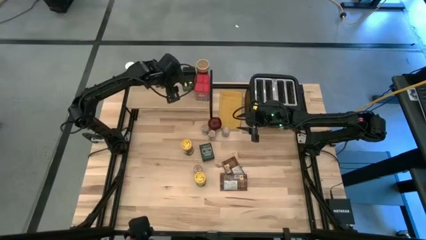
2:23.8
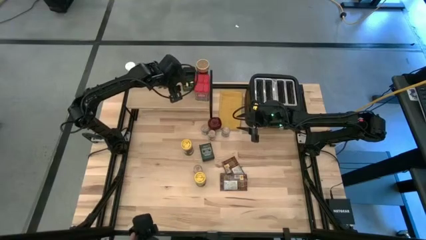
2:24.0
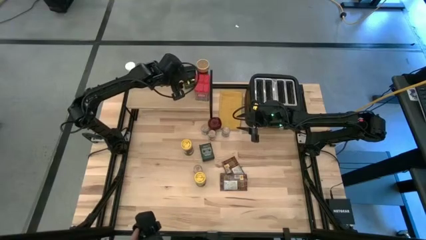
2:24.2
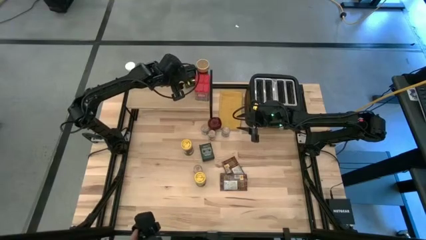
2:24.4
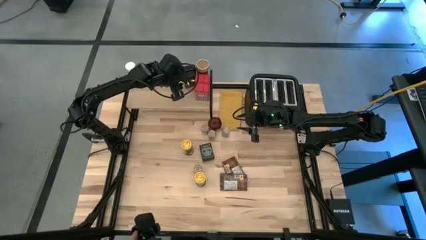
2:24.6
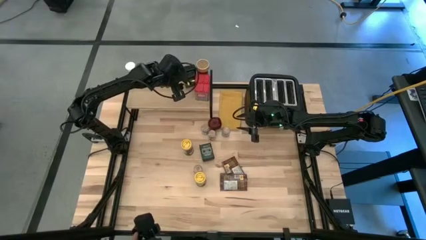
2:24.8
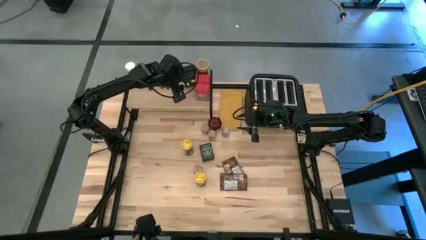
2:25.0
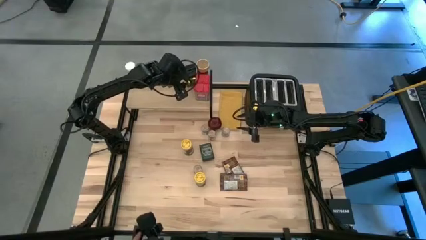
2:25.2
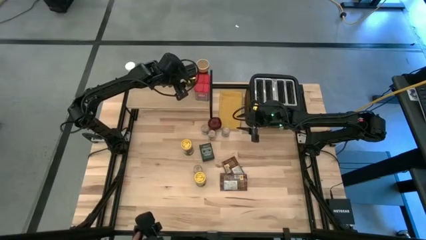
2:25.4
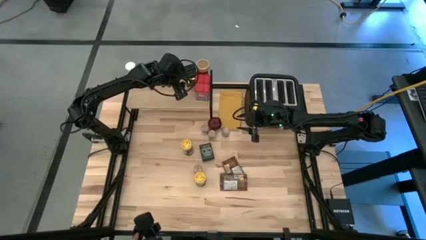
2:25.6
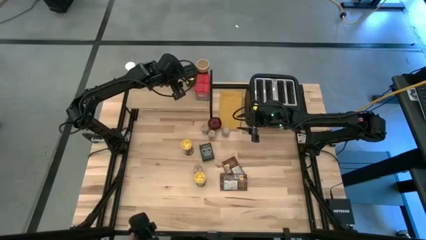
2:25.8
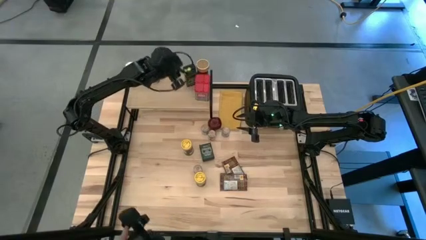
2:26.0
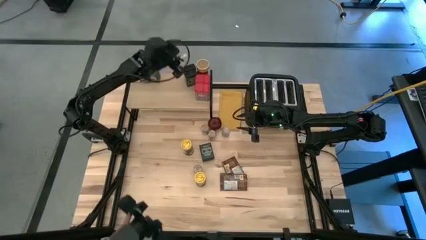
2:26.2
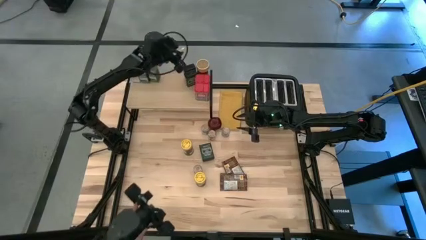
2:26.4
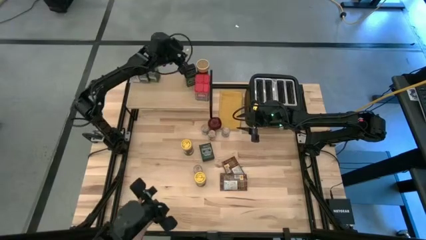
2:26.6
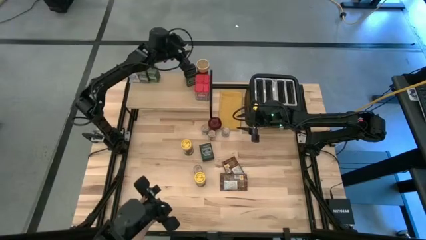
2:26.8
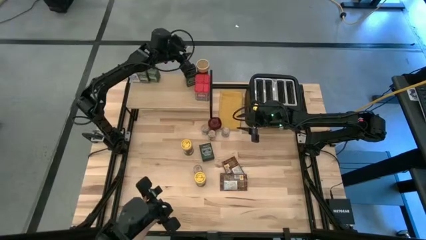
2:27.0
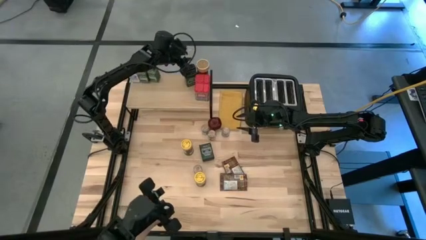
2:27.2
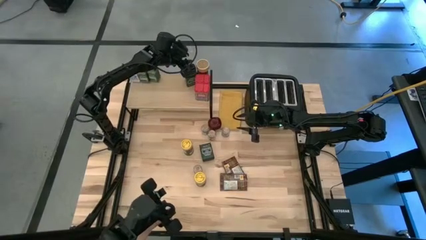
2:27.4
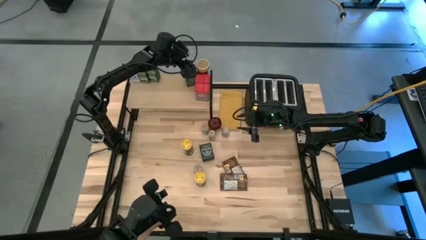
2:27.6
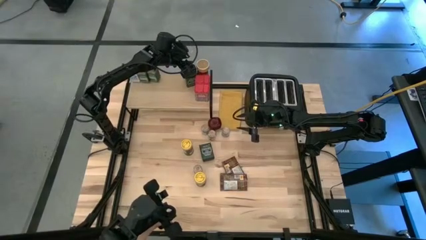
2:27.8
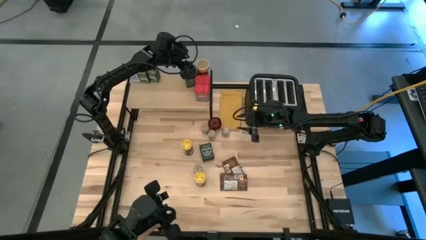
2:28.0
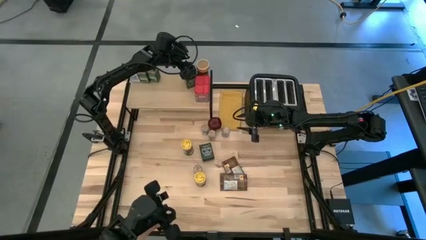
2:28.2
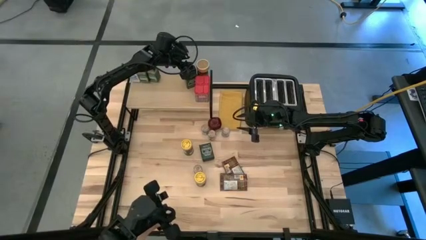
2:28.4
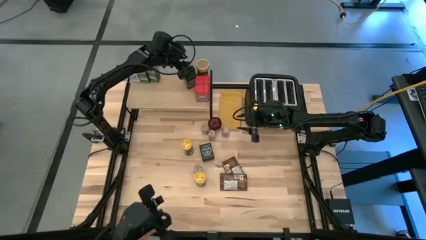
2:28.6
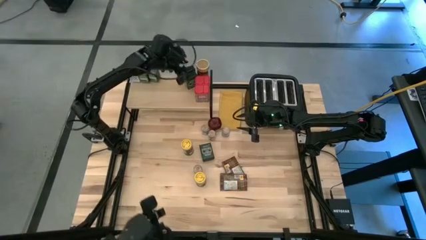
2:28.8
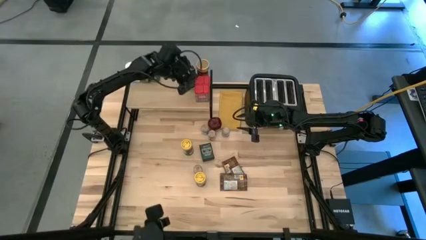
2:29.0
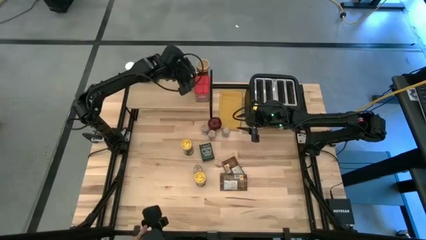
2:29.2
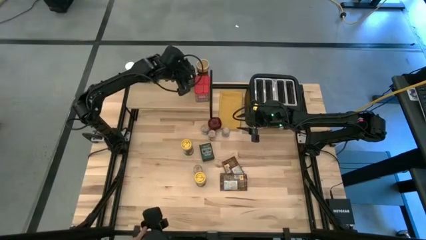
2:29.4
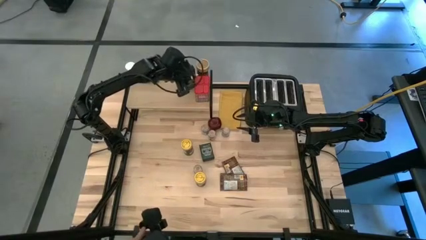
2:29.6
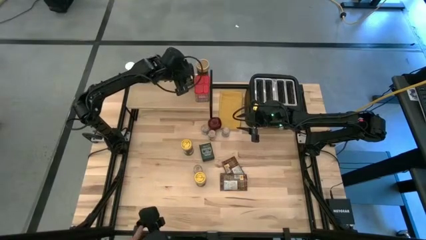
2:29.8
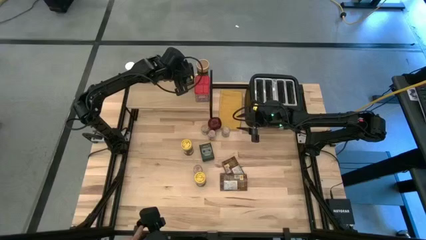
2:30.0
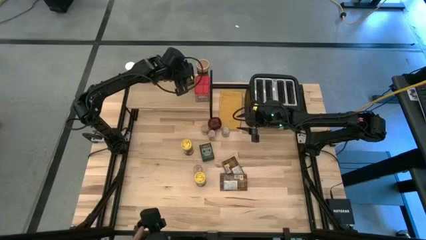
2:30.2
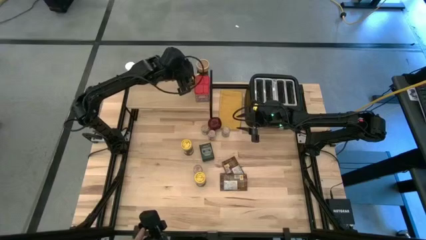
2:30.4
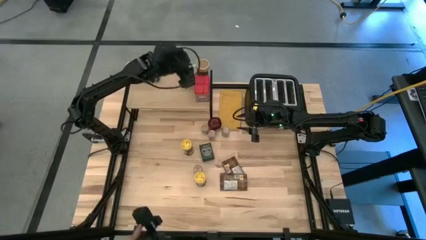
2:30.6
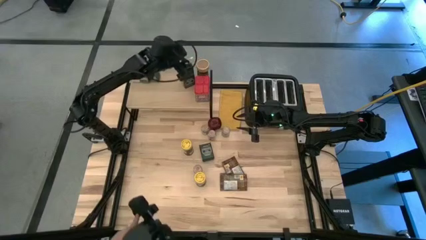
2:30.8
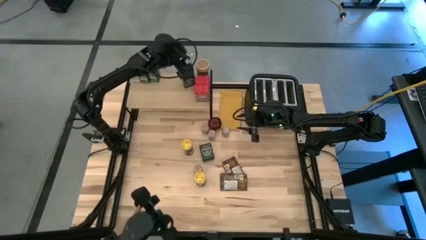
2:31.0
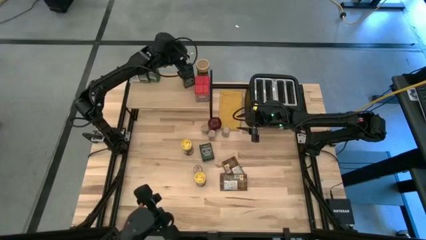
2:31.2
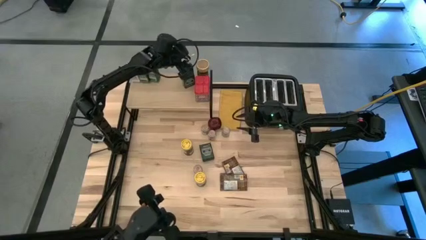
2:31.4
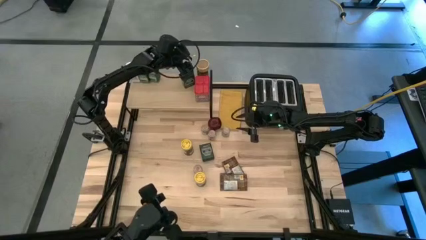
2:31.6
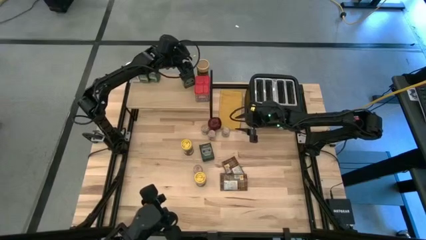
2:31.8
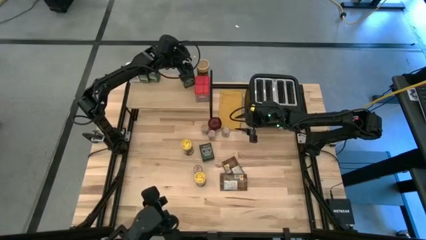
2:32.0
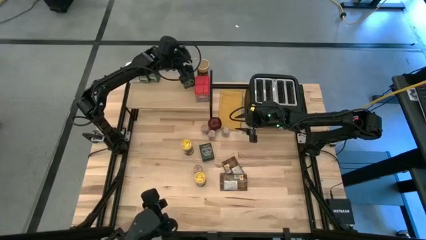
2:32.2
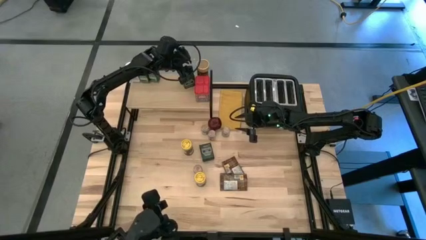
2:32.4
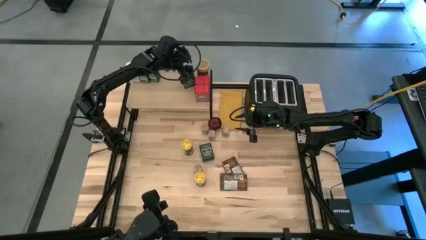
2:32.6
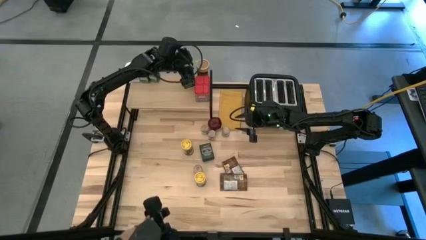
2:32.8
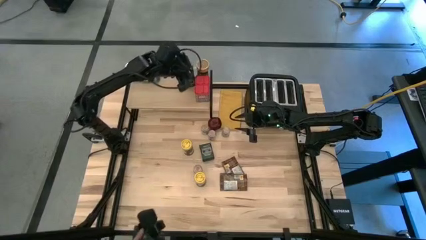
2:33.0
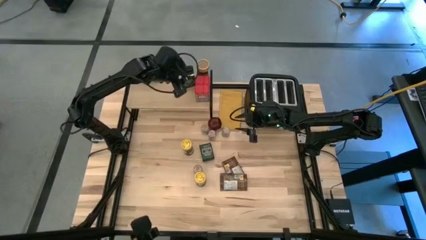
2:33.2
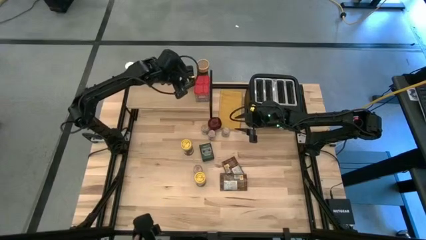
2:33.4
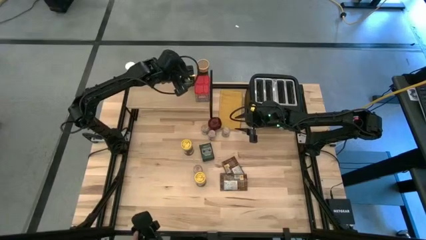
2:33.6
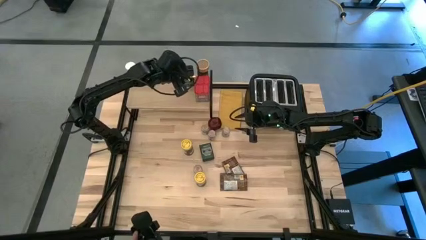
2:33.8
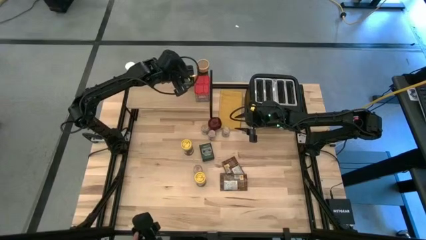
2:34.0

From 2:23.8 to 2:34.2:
Task: Shelf spices
Put the bottom black seasoning can aligned with the other black seasoning can on the shelf

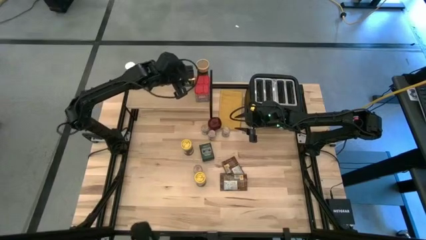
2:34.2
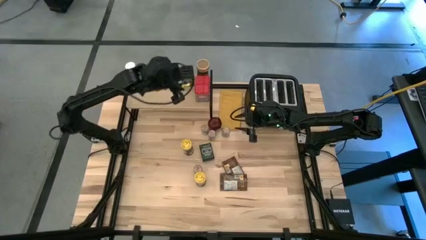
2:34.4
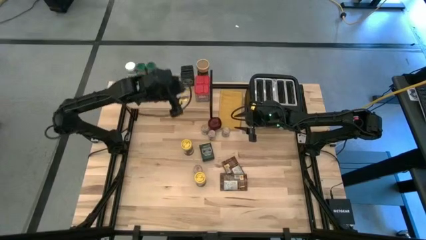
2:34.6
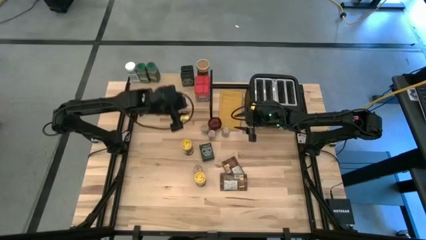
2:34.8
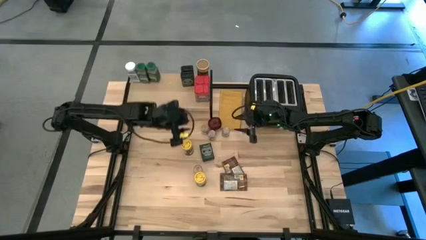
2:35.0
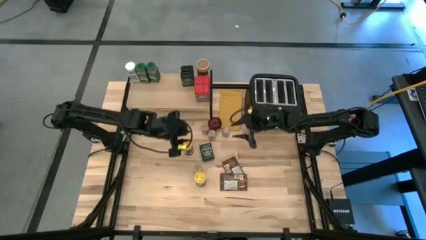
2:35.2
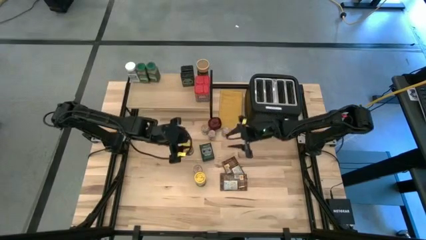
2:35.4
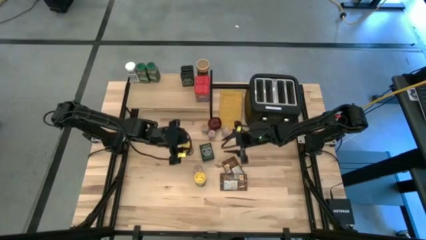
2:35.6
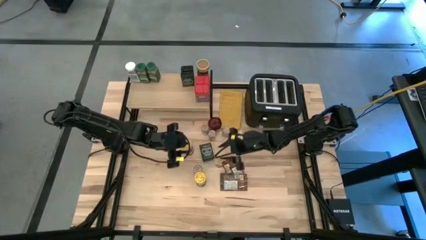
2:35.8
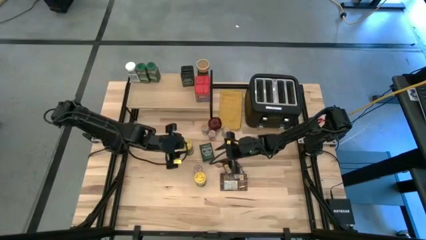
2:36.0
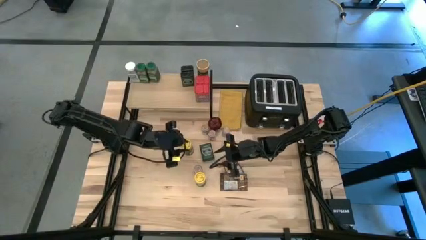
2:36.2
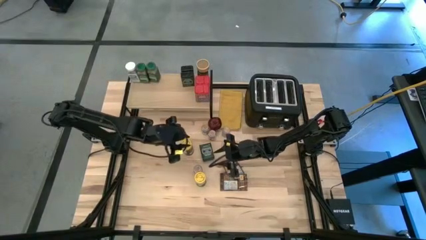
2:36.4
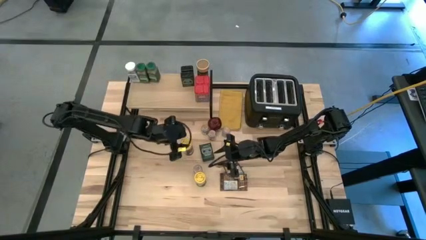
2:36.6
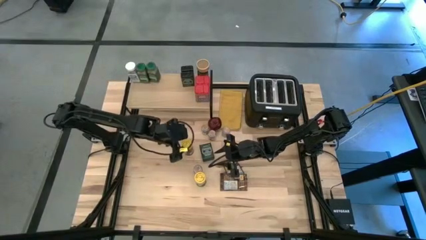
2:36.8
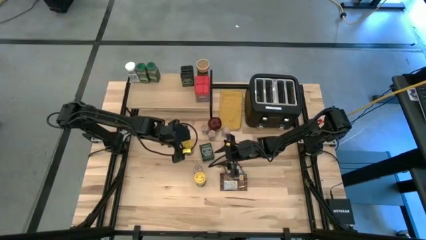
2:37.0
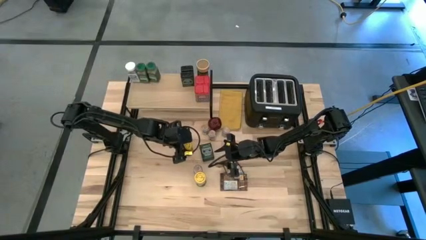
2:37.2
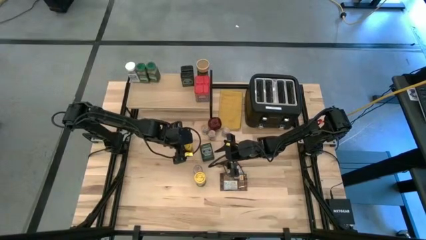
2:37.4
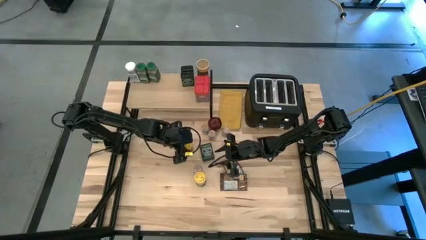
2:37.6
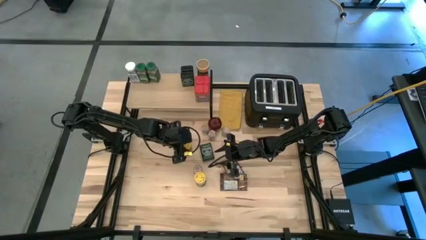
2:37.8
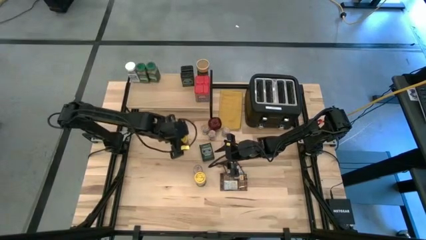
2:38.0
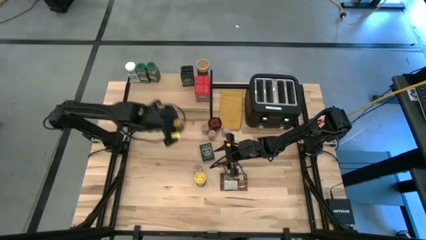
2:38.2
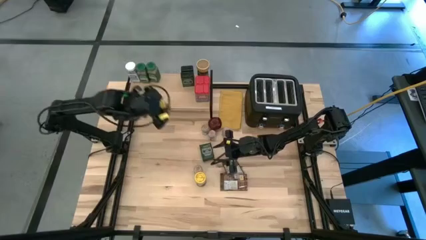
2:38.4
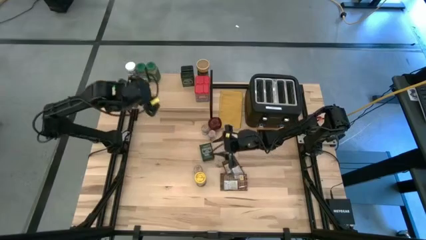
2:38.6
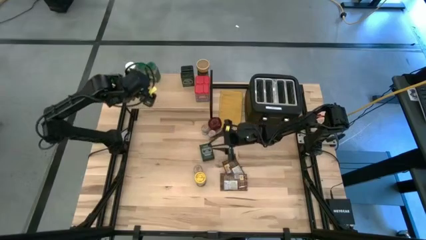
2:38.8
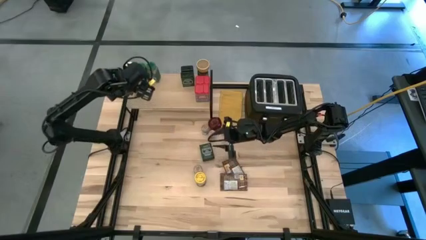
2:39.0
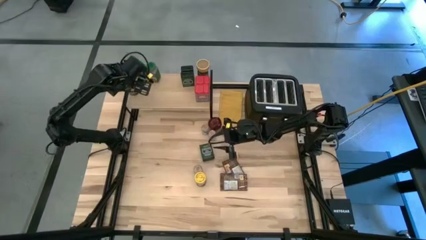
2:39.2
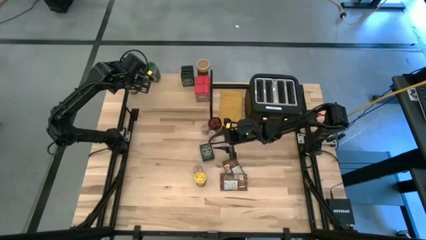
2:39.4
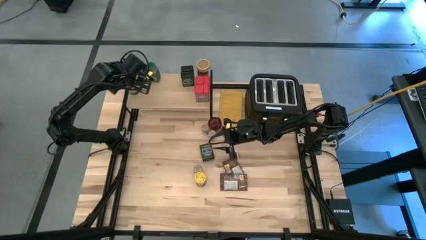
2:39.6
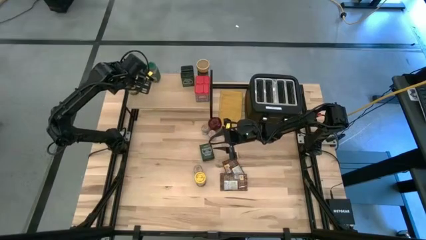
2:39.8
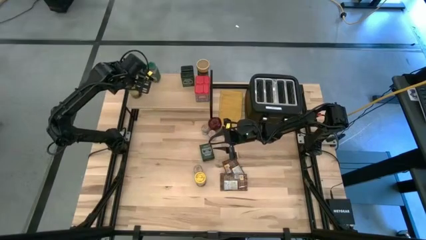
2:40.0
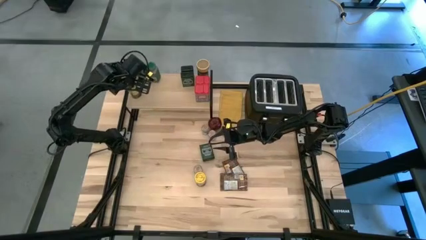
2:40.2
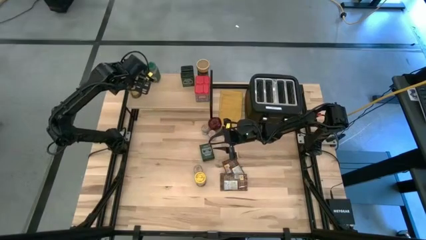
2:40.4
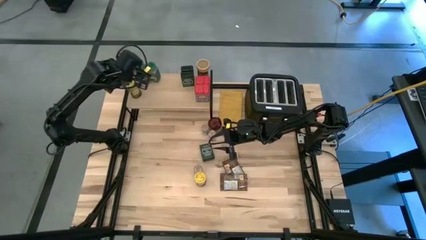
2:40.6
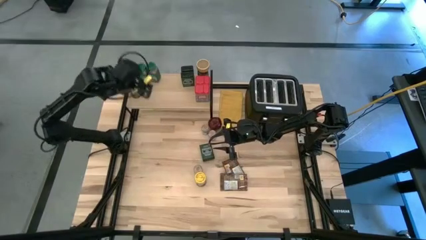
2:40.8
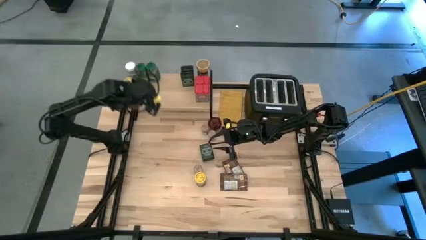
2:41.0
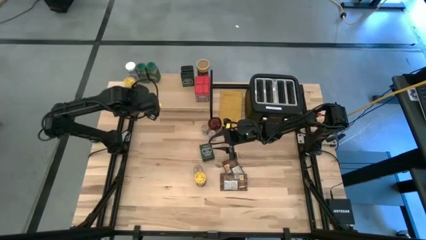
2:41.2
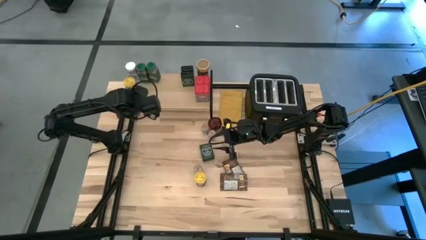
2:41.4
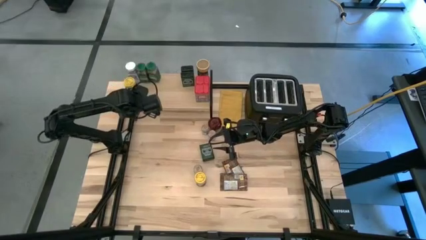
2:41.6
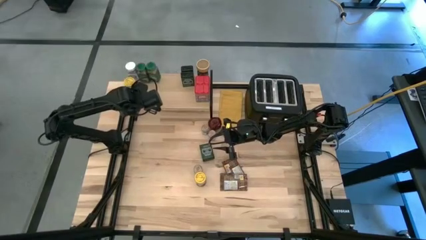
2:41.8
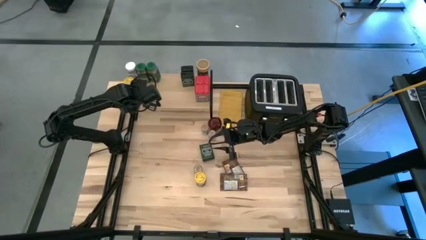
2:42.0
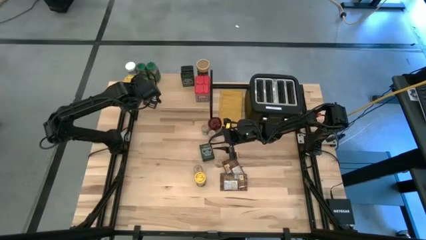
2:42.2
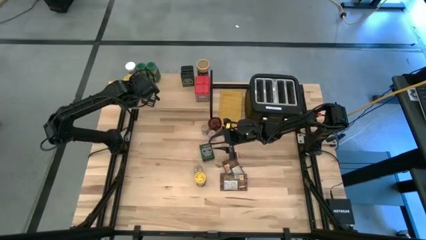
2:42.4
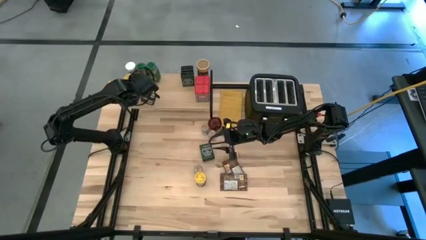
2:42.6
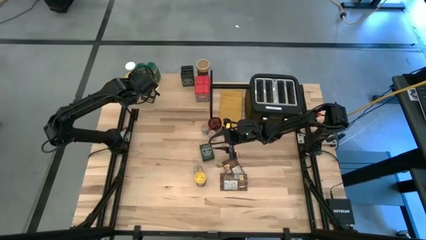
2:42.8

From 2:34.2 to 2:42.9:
Put the top yellow seasoning bottle on the shelf
